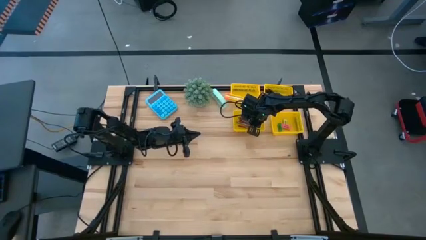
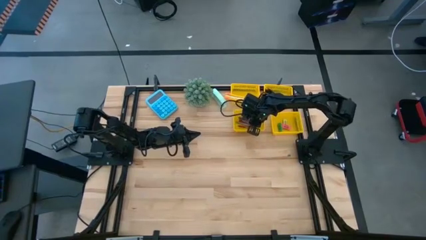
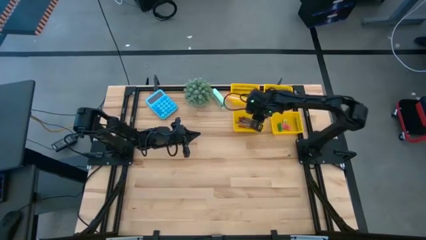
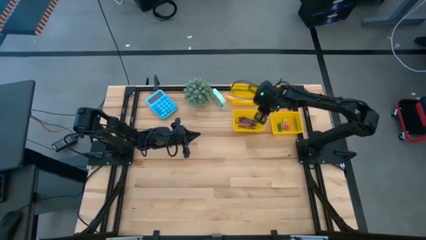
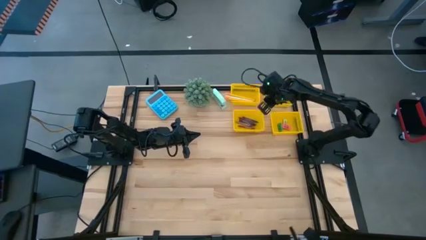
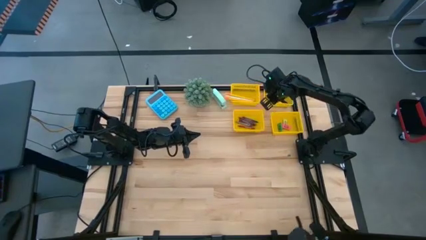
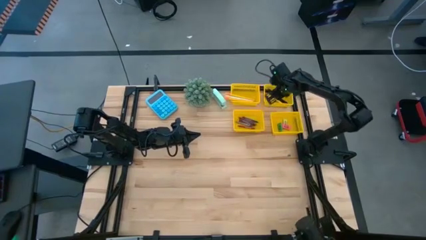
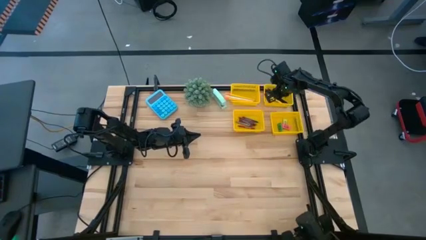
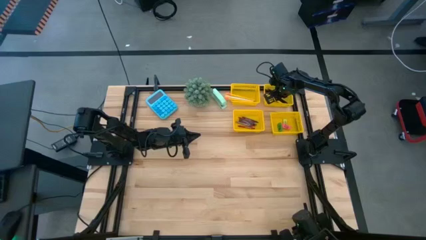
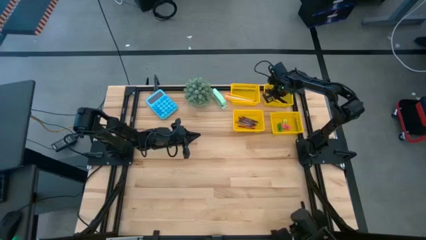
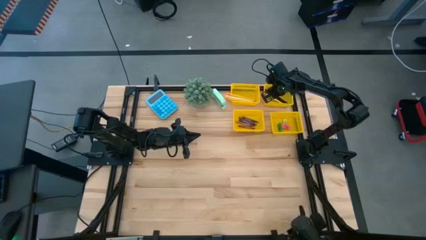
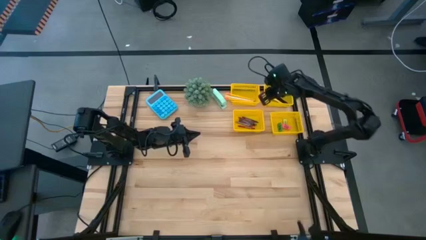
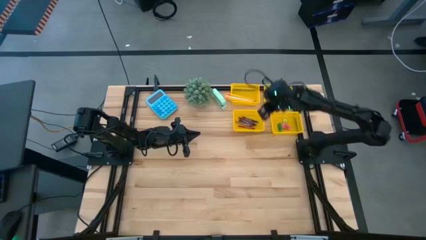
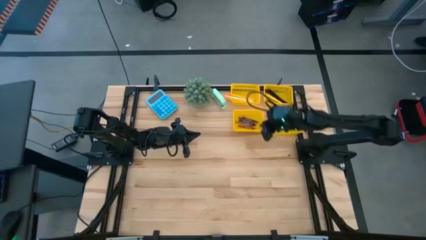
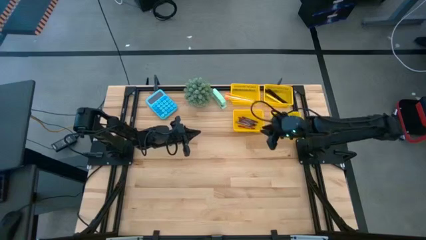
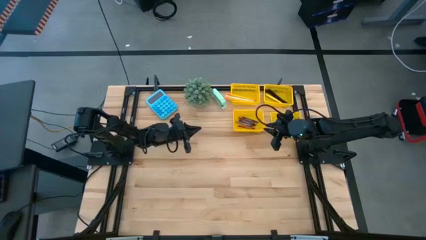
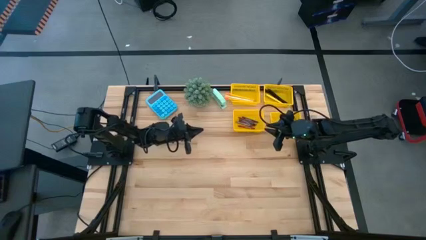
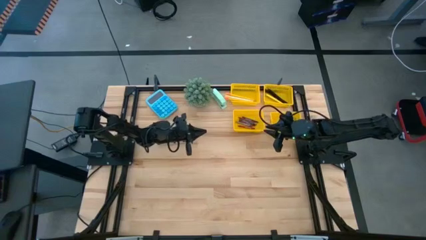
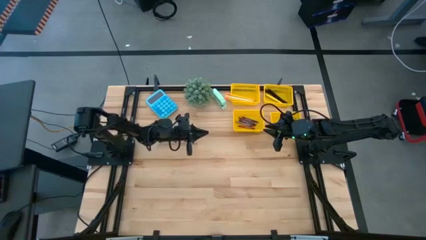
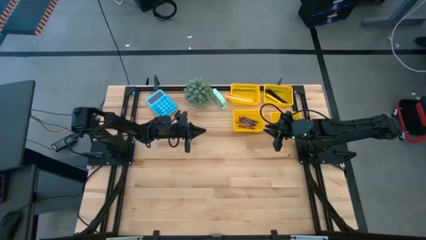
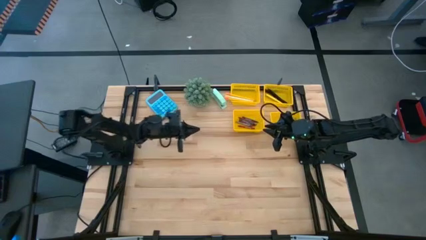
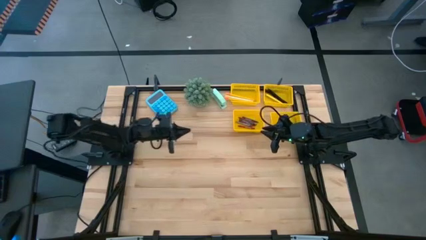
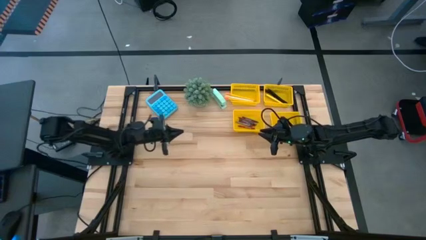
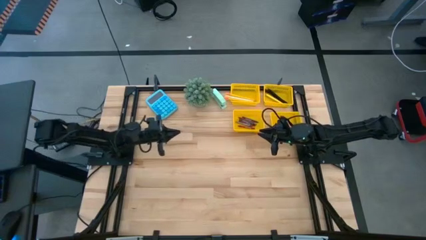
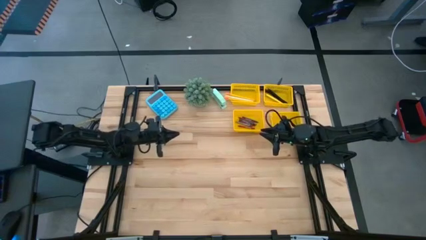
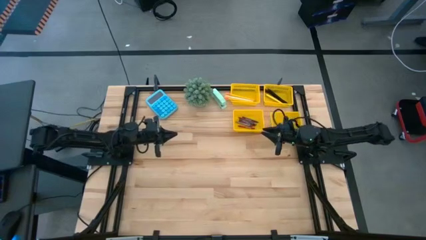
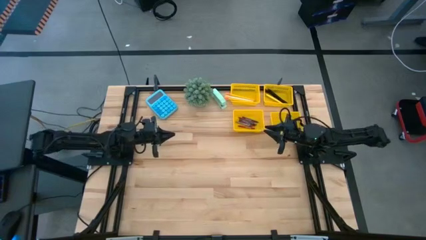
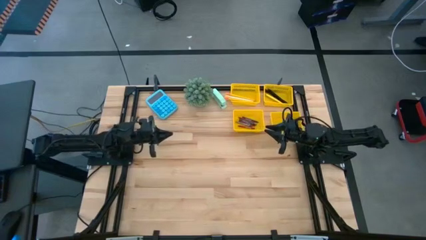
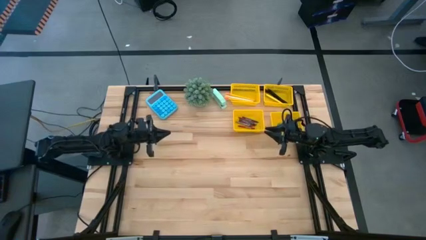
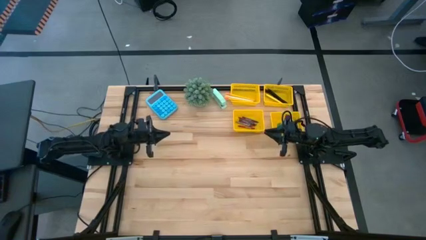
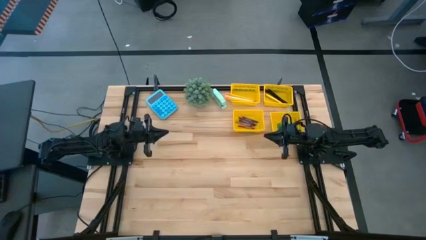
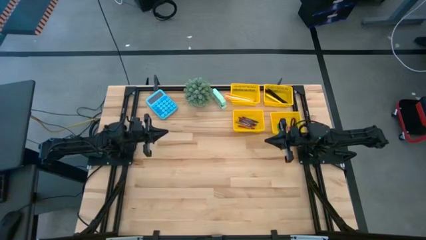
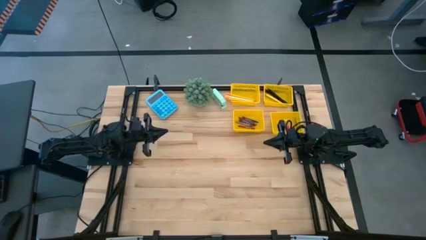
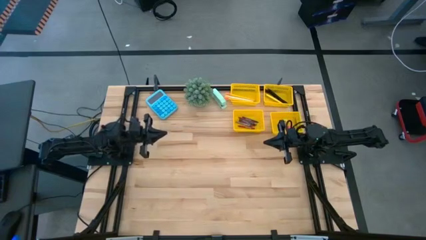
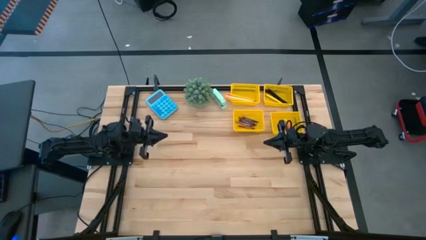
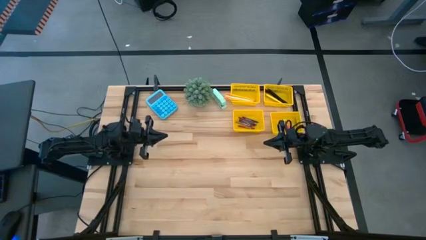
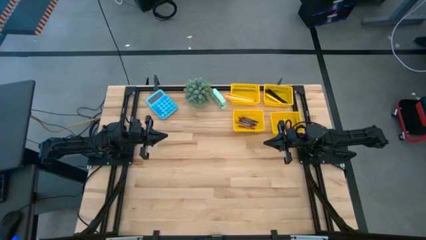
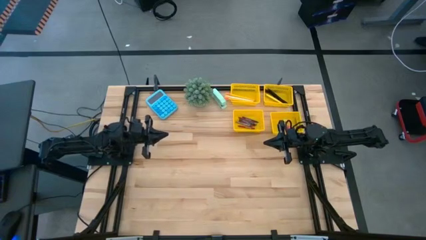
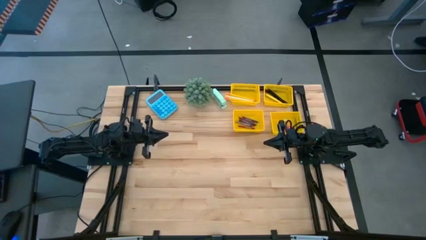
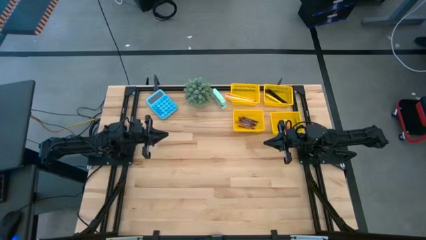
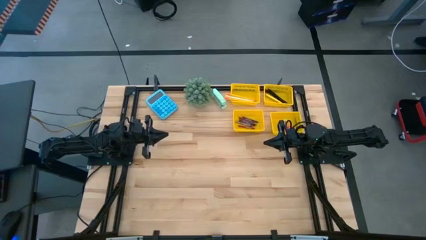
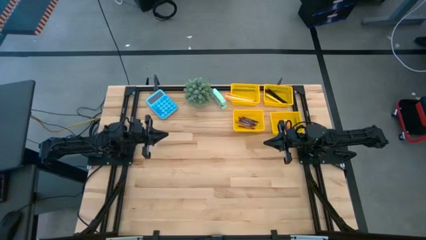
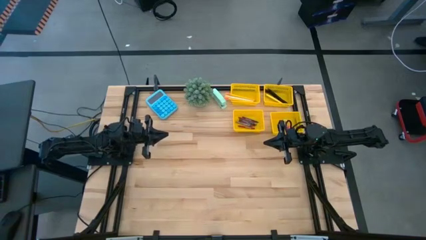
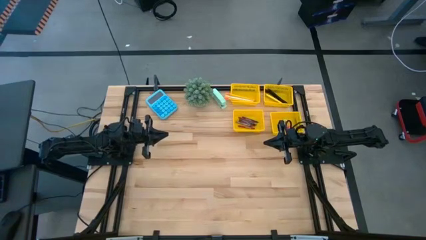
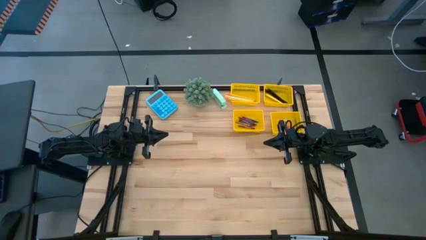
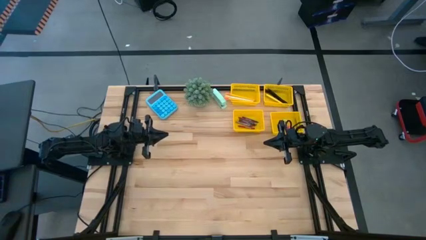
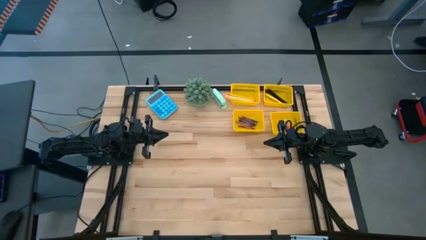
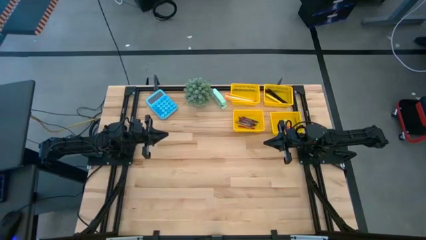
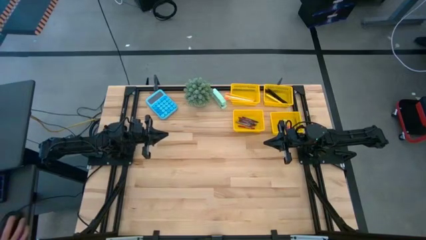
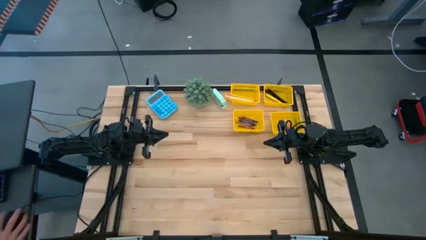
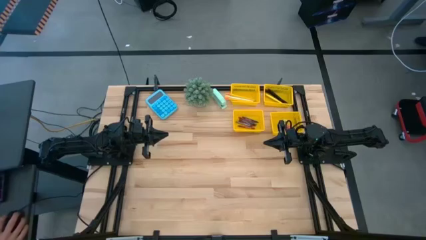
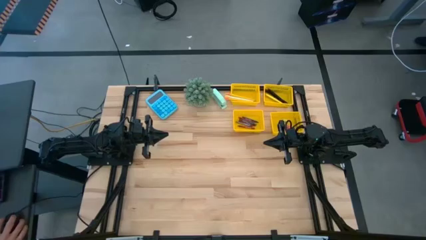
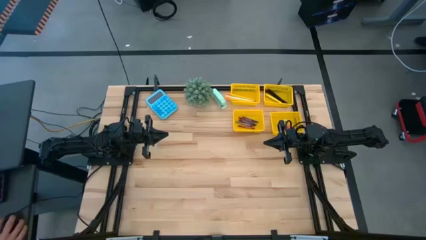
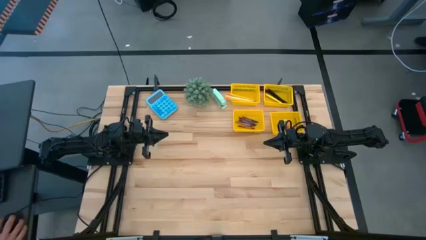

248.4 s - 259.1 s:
Task: Sort crayons/erasers/pens/pencils in bins
Return to Home Position

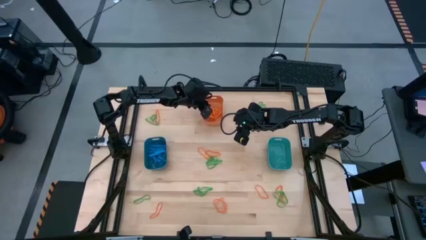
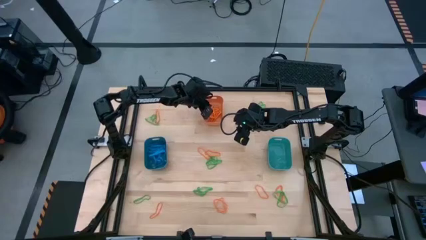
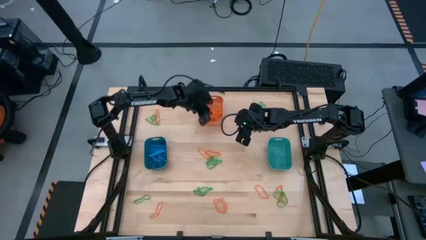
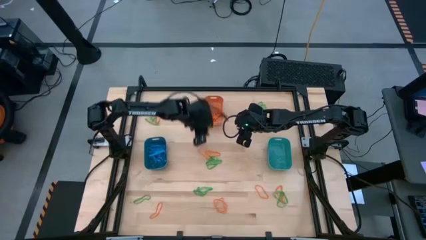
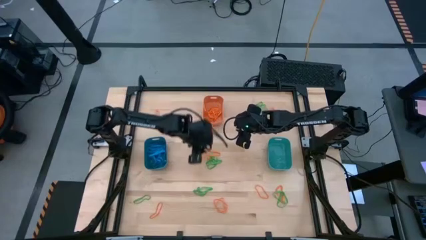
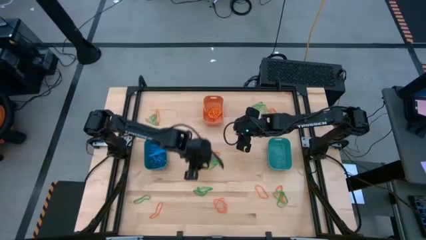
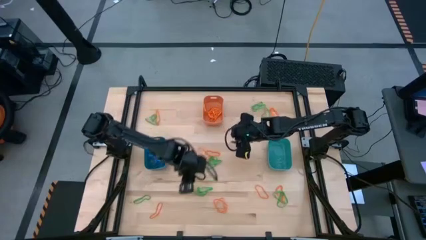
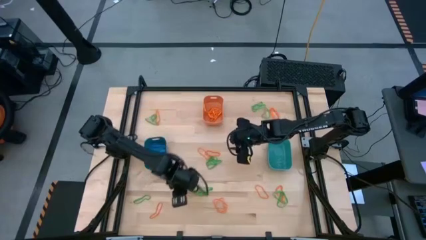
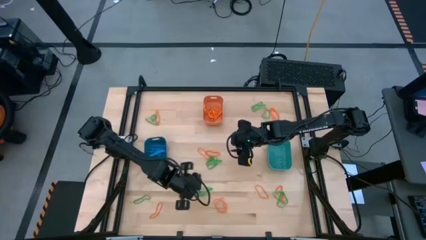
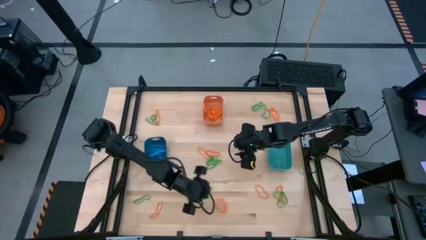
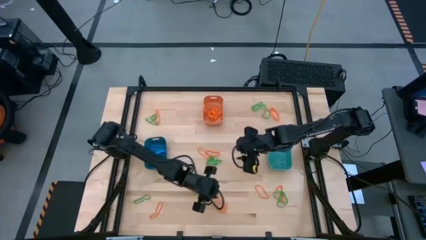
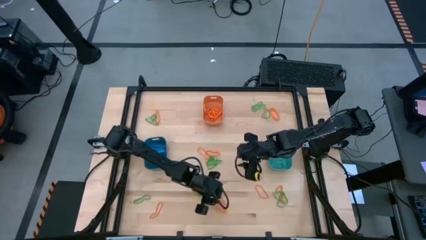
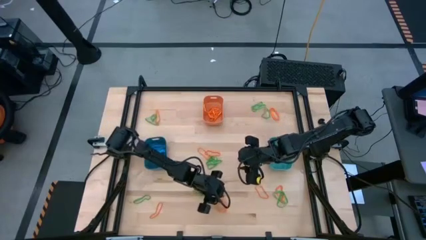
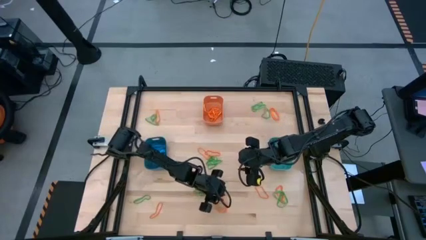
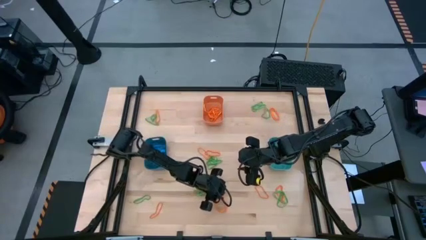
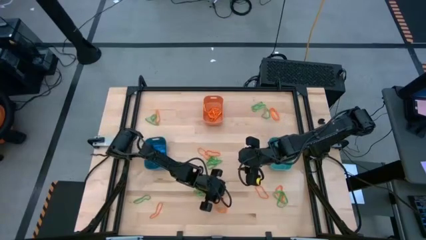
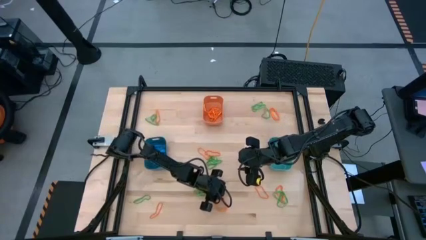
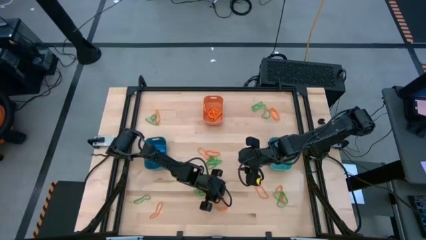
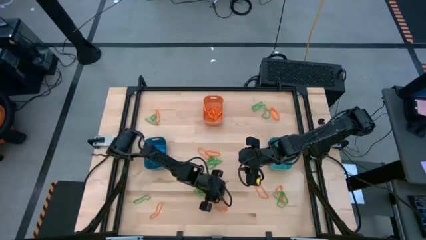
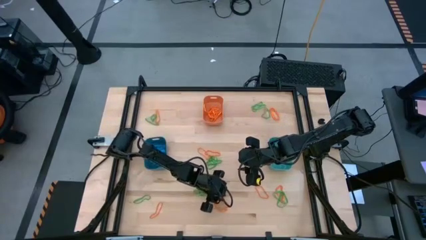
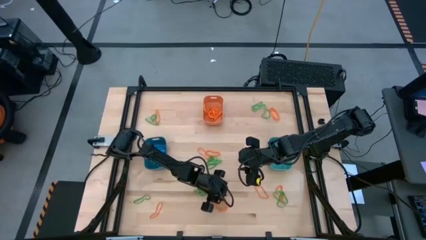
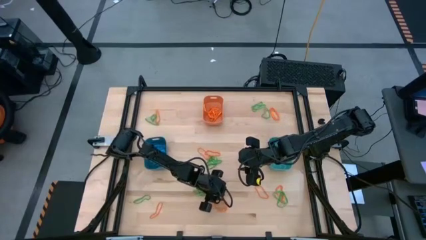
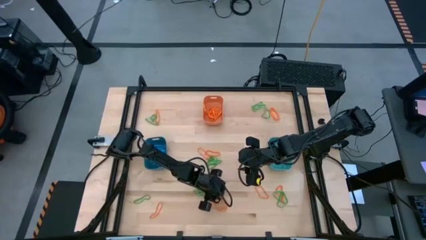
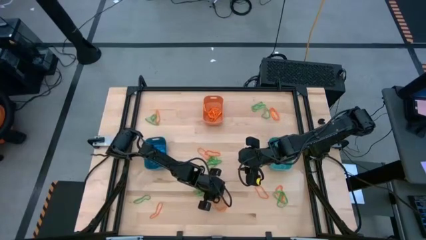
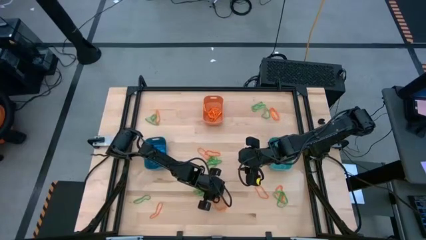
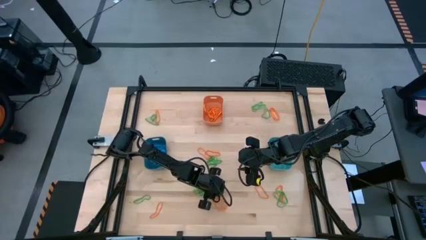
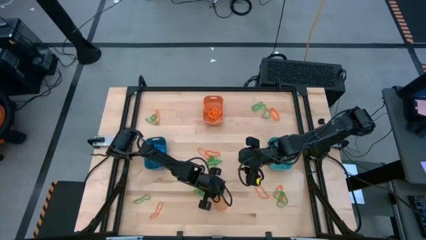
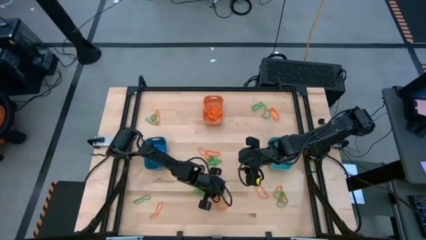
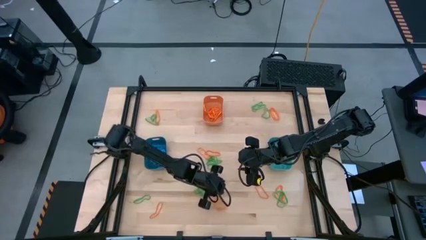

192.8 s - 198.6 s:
Task: Sort rubber bands into baskets
Put the orange rubber band into the orange bin
